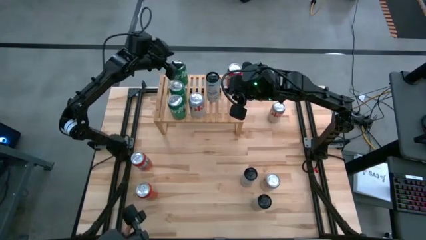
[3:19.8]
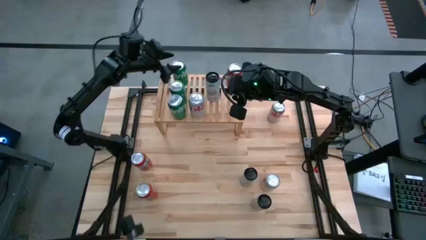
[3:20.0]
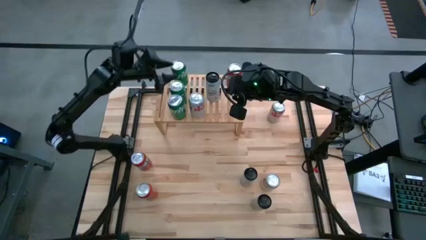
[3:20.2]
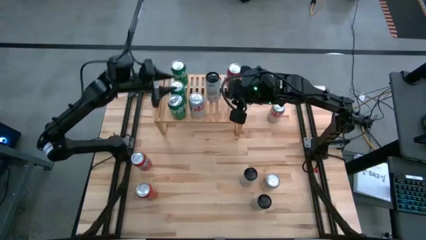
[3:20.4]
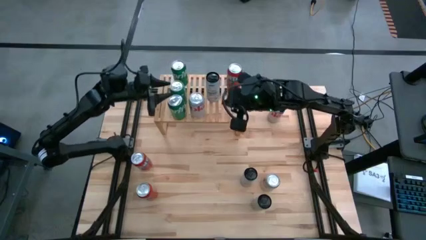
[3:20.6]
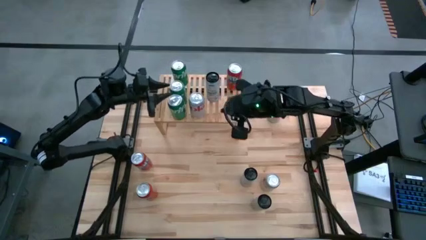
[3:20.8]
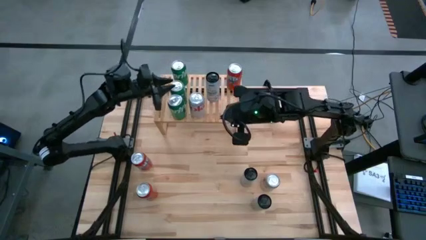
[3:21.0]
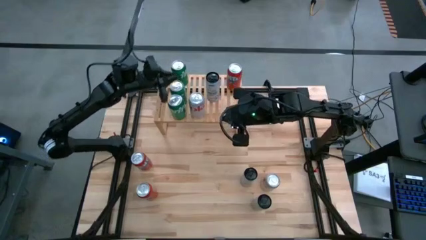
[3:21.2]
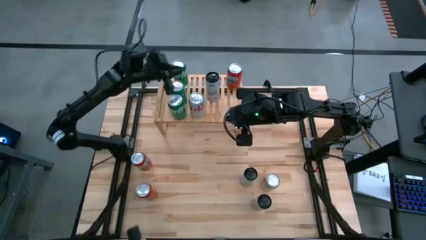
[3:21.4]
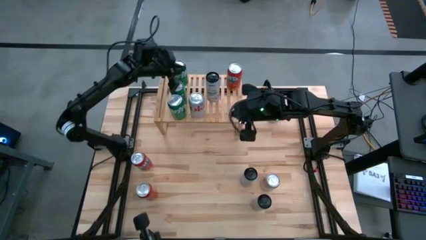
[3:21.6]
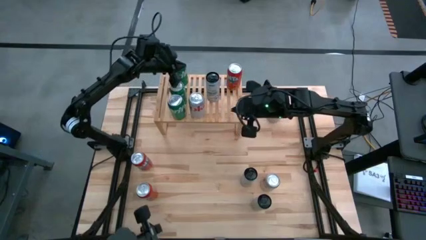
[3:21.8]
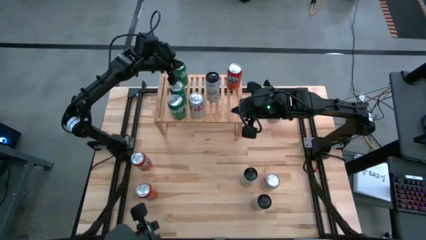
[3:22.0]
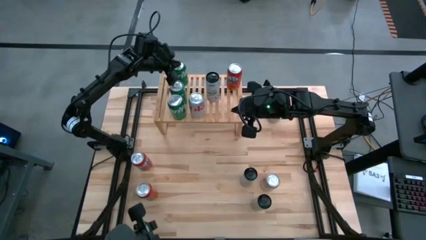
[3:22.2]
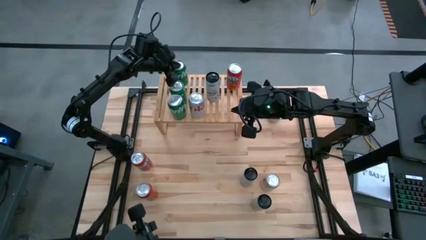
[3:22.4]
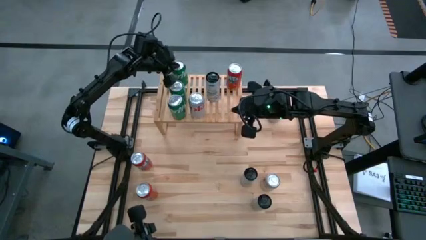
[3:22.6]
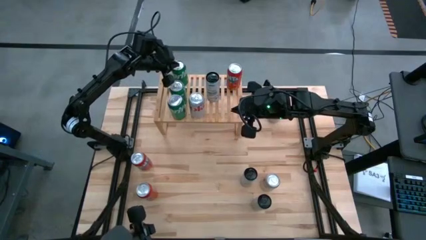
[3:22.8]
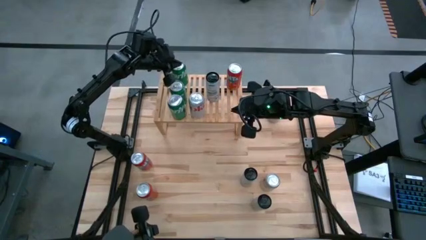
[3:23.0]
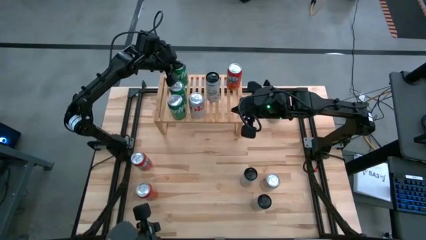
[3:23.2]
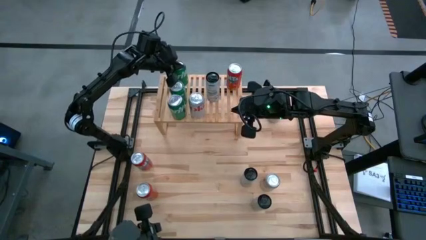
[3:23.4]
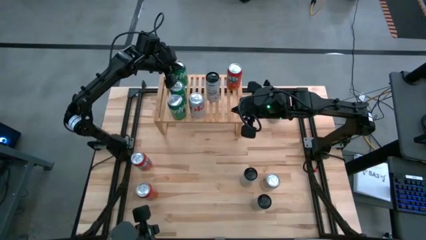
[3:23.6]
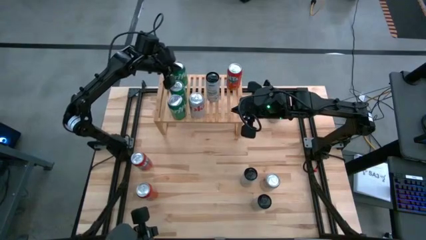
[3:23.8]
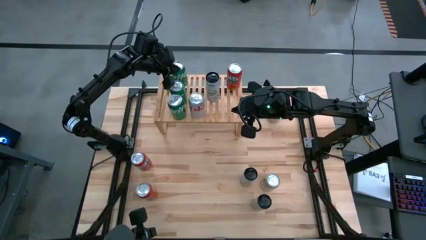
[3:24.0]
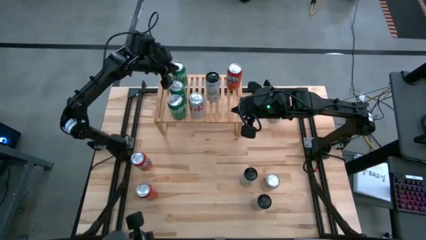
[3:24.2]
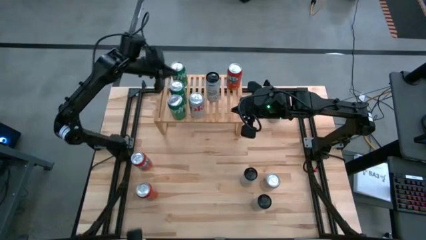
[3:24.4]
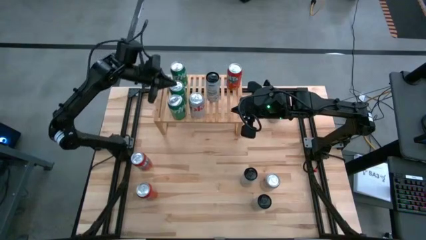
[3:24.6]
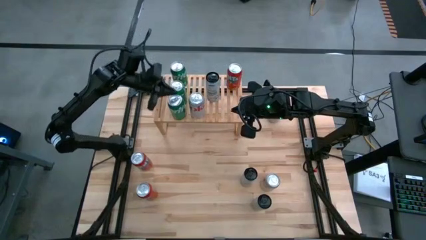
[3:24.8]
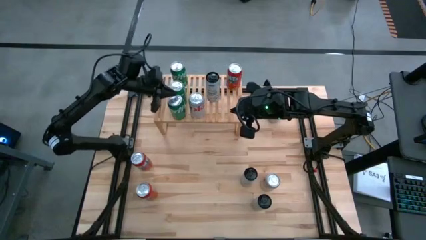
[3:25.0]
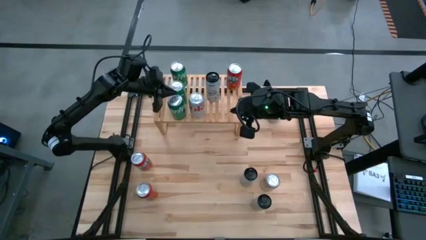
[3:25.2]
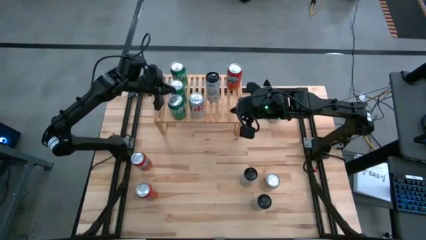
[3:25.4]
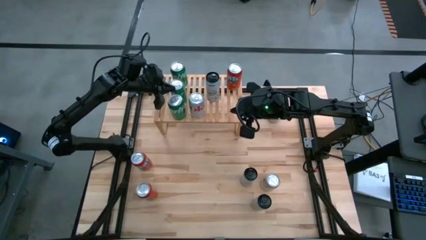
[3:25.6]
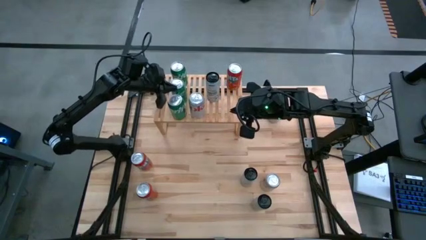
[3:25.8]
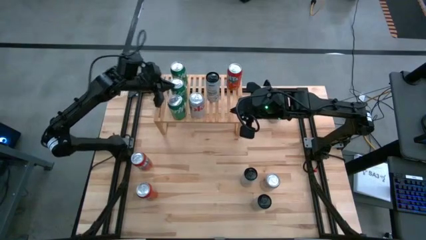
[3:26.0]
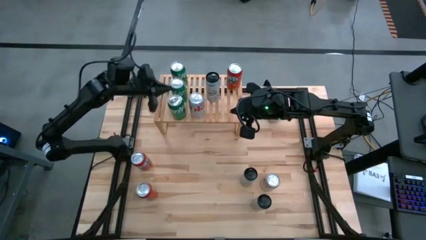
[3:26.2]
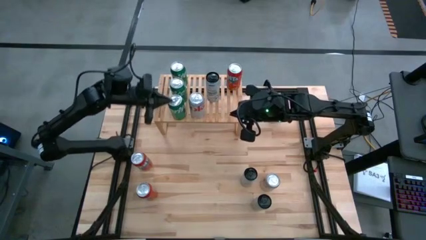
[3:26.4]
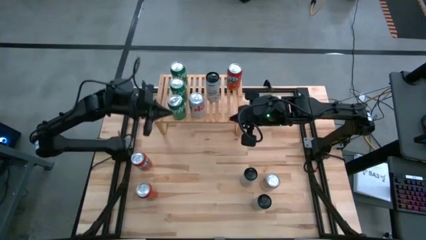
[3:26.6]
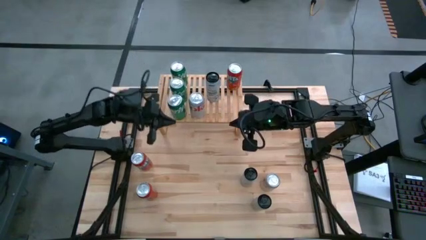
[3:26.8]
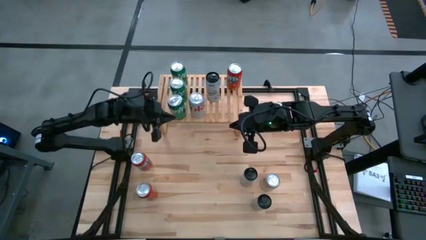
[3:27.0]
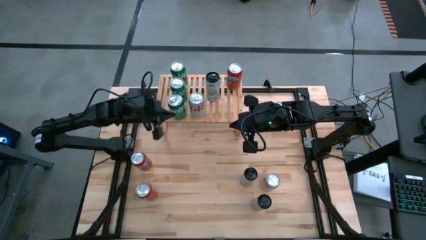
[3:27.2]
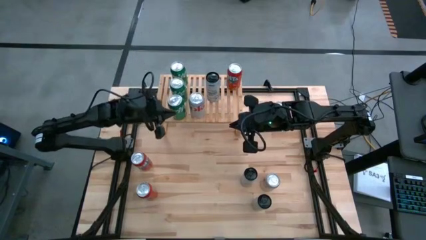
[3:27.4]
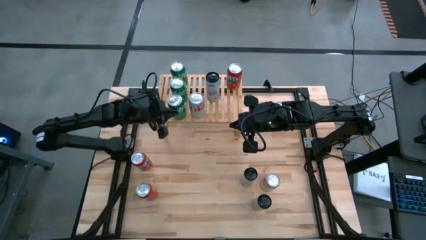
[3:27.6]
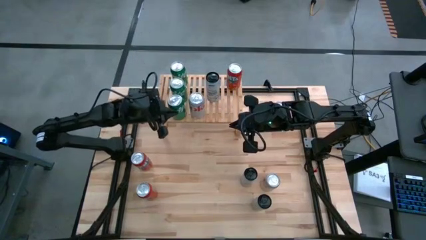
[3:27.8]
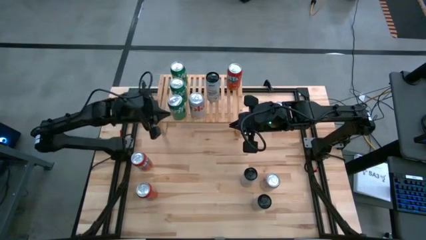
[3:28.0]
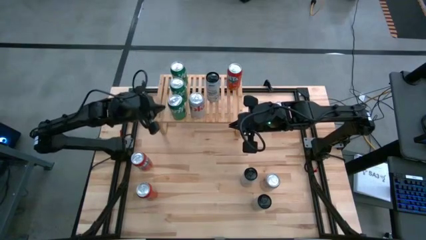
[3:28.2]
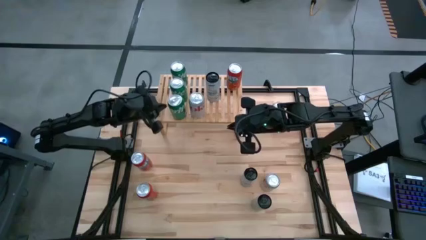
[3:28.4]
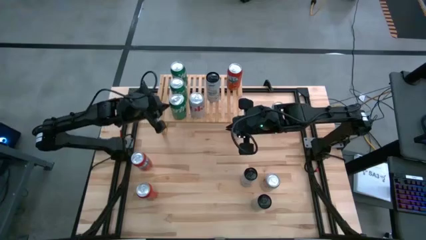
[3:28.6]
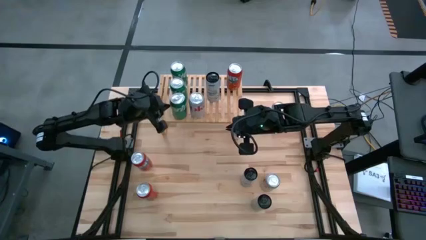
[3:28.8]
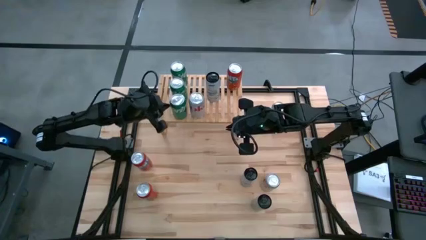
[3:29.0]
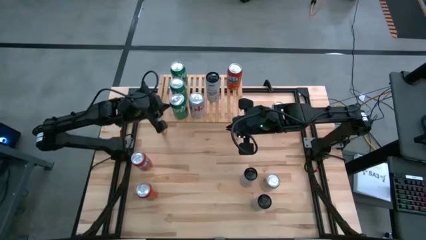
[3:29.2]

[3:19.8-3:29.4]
Task: Place canned beverage on shelf
Adjust the green soda cans

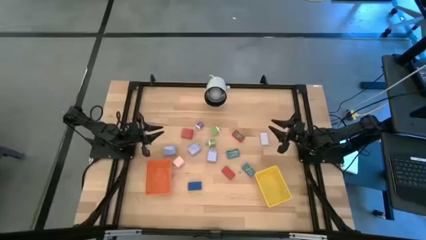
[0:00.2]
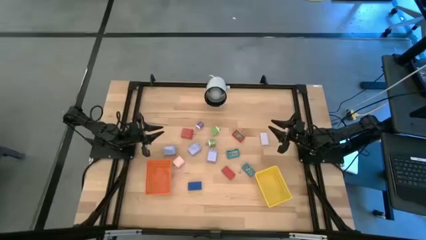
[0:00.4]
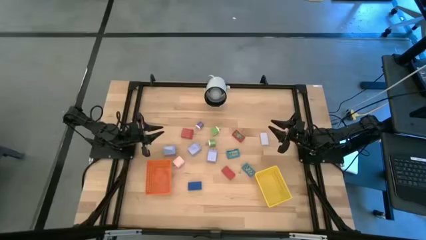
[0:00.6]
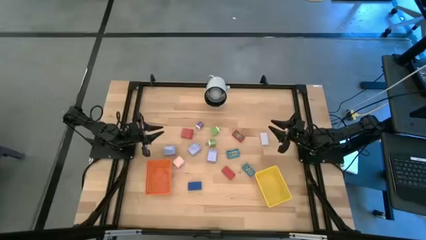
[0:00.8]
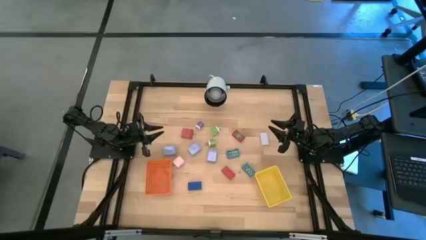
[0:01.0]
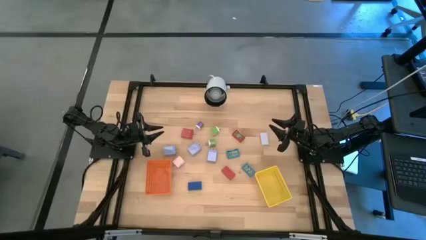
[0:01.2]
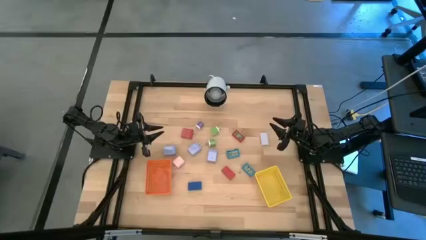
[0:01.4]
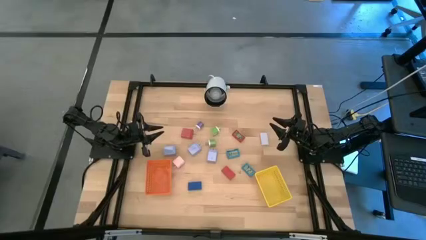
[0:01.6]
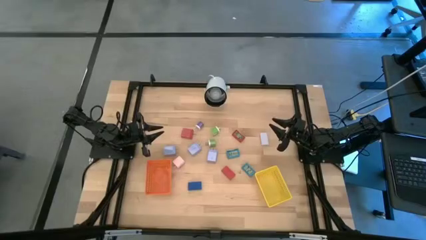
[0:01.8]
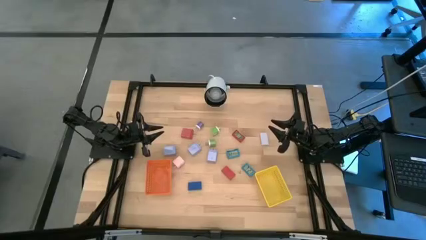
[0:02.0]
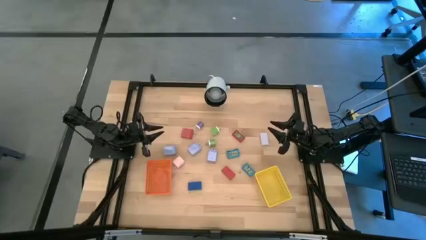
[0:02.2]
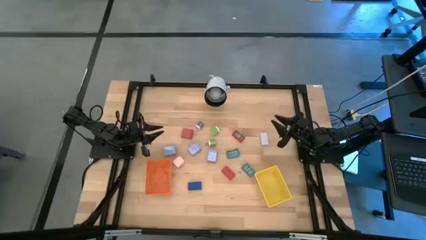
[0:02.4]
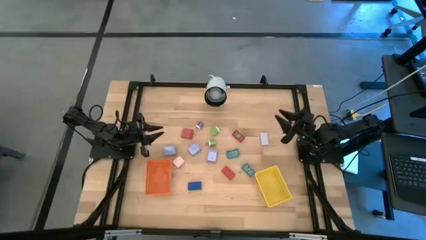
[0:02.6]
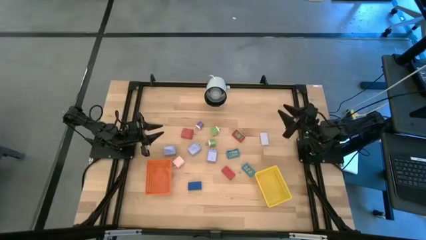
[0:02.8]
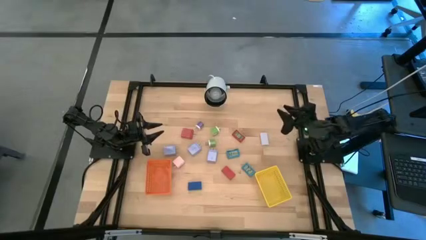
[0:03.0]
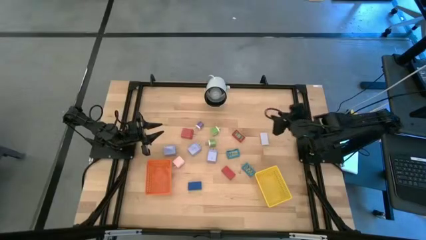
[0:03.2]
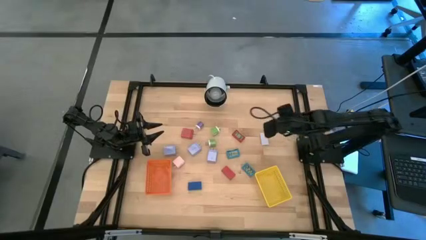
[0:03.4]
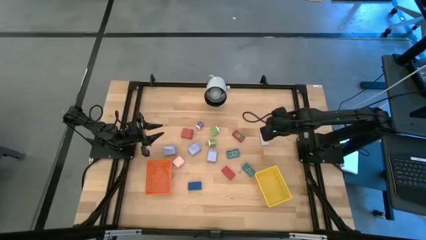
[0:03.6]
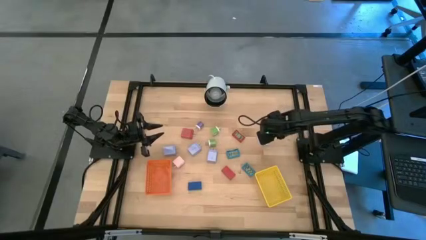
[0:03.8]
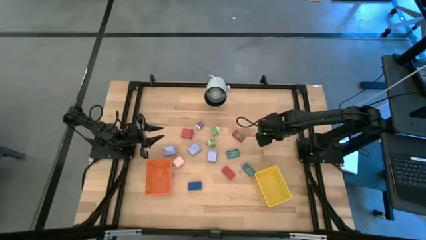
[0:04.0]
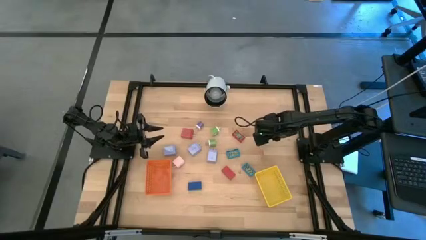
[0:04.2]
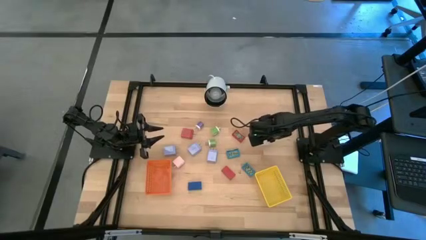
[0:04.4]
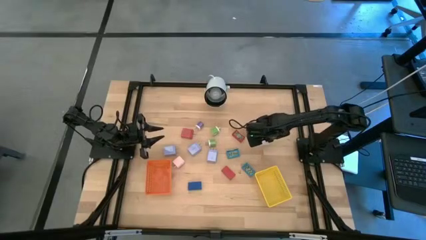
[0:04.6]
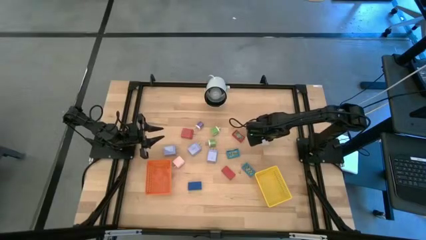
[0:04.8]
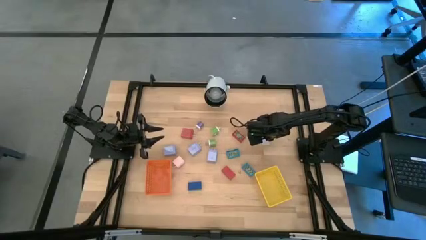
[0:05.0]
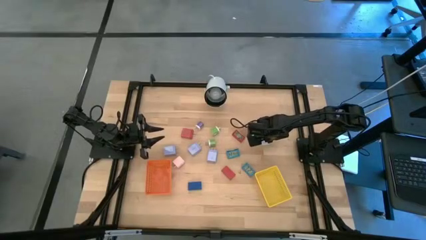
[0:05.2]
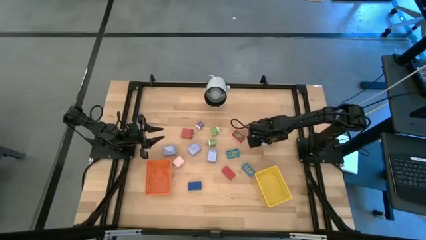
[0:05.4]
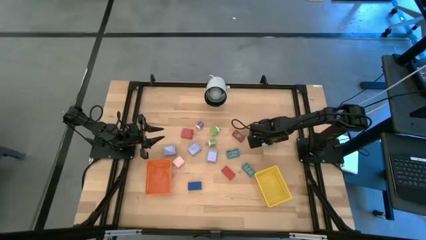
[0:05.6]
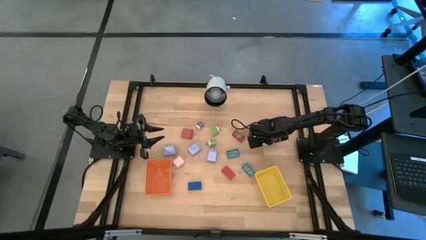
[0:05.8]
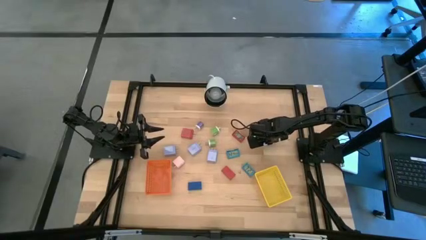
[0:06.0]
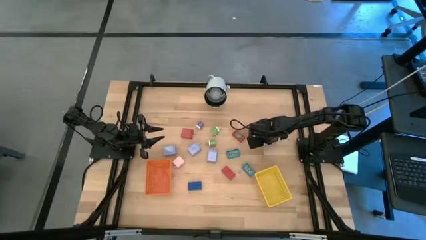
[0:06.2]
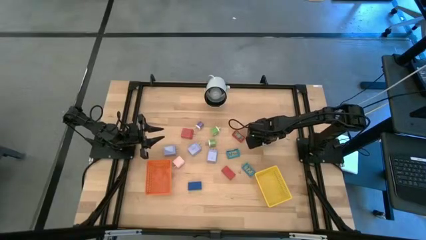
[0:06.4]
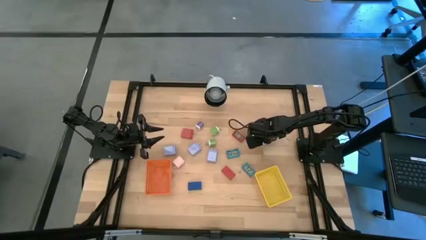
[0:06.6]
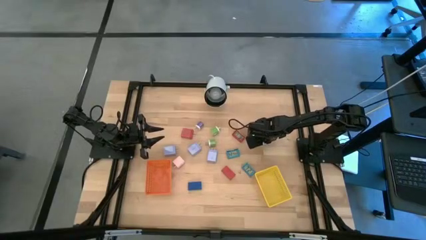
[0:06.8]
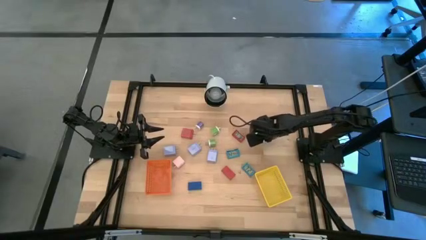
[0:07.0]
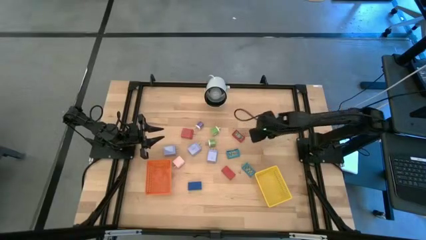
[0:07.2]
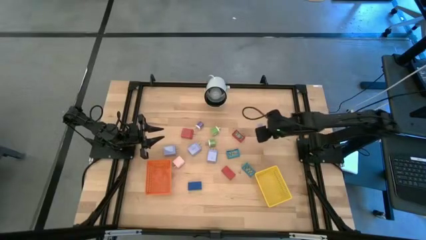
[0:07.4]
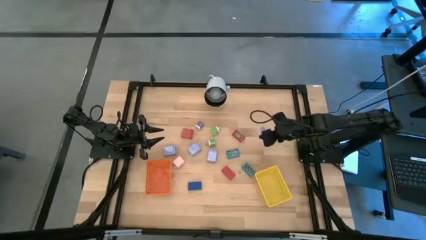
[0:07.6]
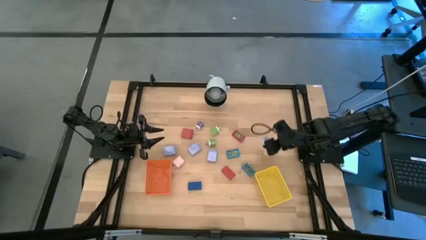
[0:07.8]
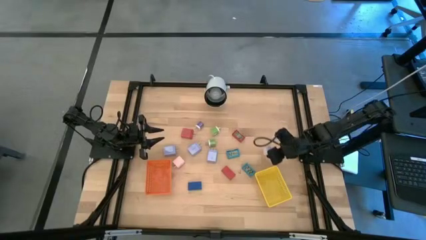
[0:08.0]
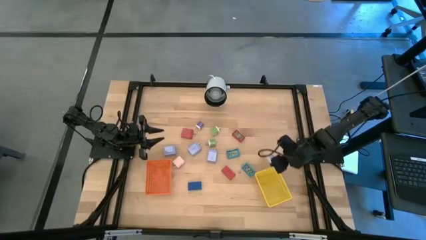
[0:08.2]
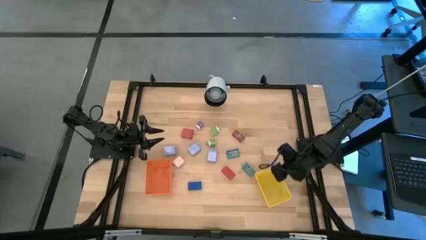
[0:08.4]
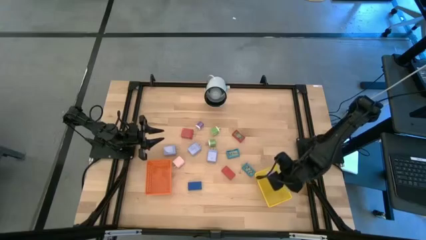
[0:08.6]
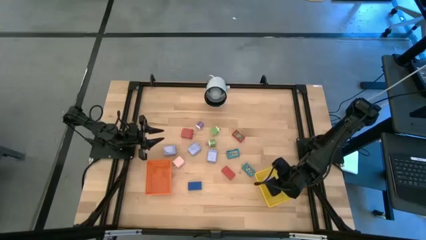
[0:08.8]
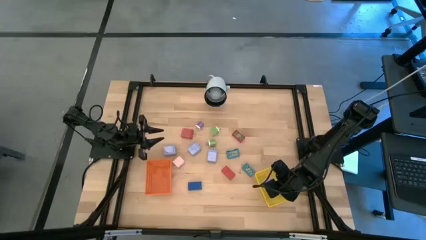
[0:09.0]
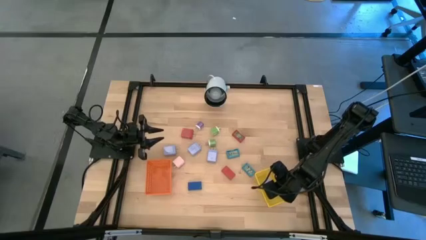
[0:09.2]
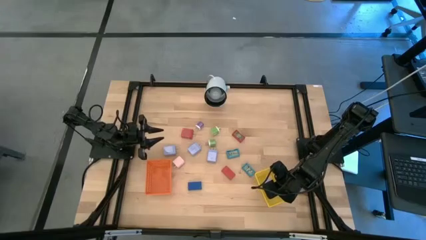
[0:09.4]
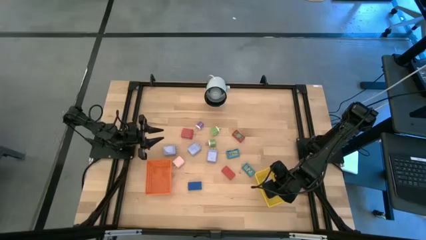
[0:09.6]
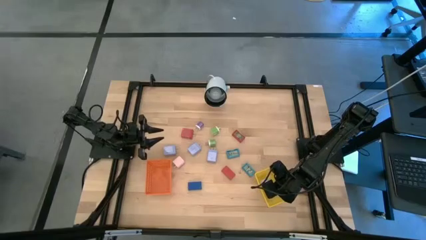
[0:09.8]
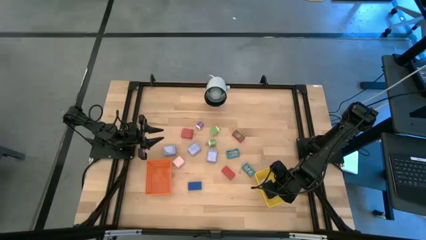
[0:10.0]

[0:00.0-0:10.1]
Task: Pick & Place Office items
Put the white digital clock into the yellow basket
